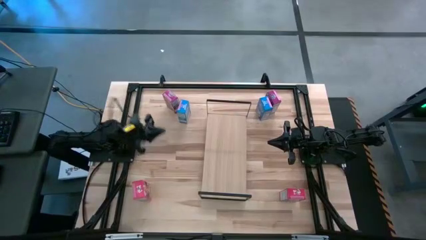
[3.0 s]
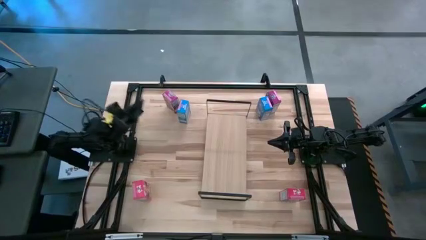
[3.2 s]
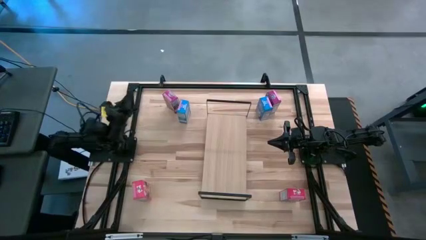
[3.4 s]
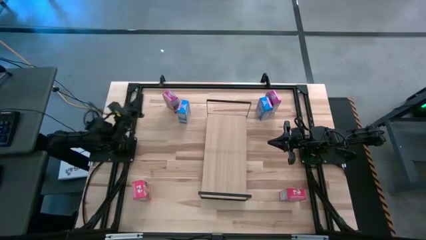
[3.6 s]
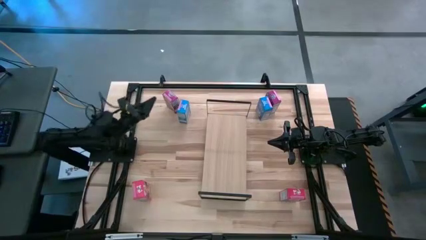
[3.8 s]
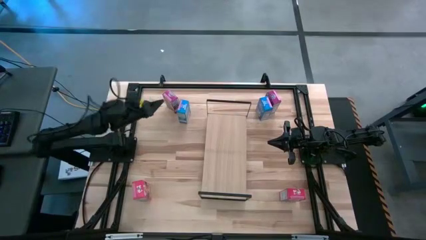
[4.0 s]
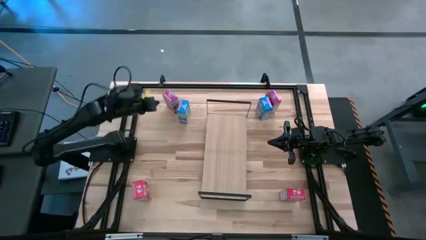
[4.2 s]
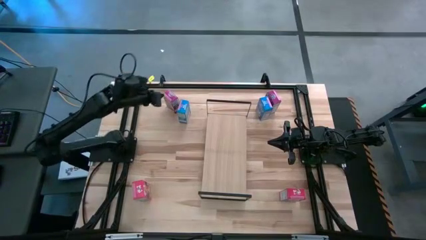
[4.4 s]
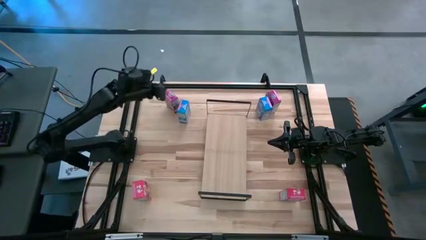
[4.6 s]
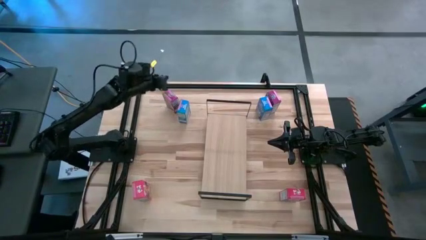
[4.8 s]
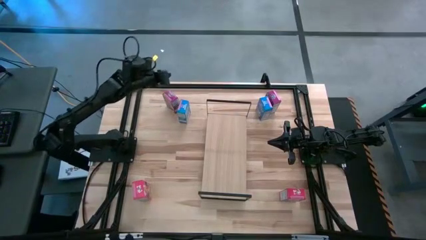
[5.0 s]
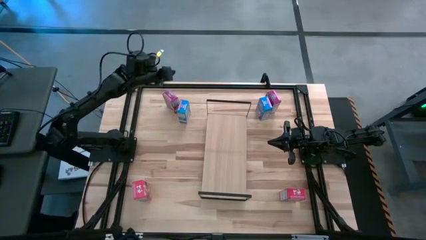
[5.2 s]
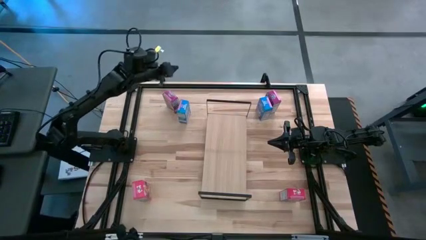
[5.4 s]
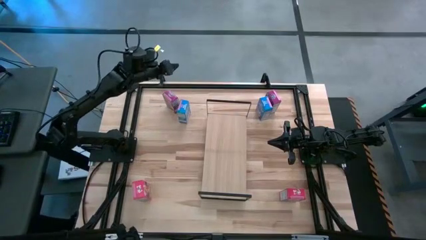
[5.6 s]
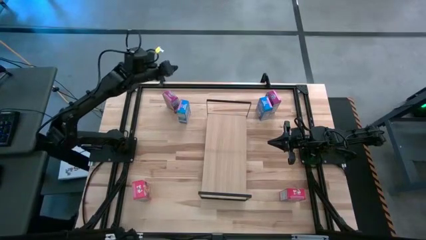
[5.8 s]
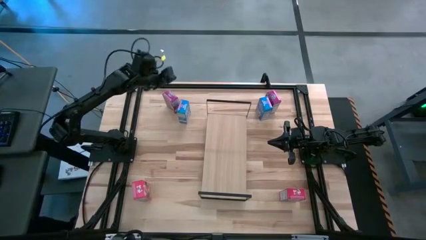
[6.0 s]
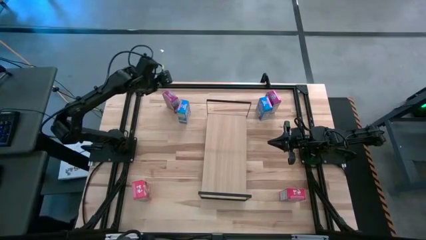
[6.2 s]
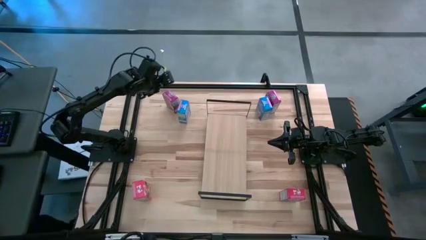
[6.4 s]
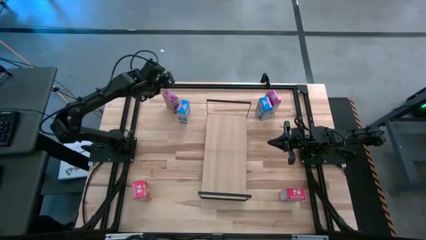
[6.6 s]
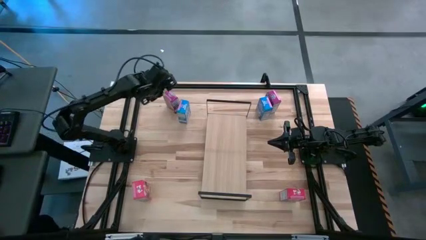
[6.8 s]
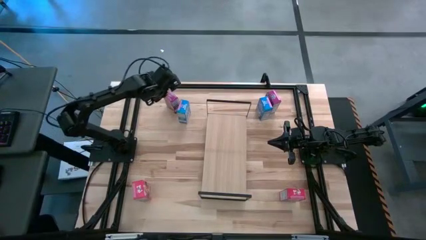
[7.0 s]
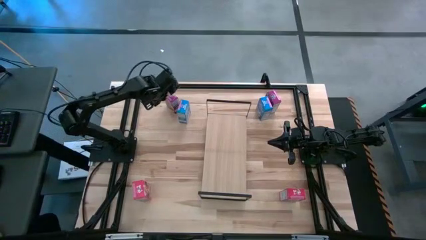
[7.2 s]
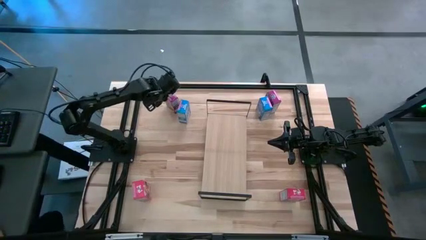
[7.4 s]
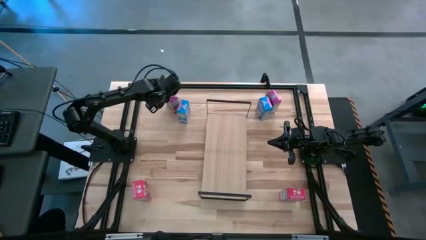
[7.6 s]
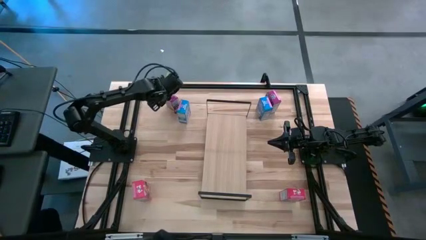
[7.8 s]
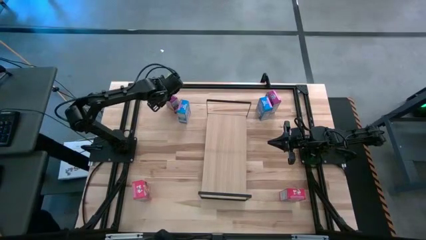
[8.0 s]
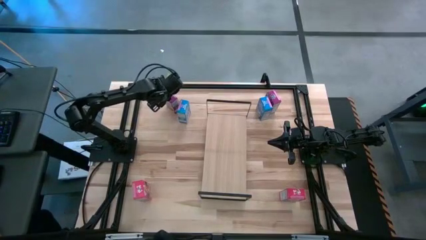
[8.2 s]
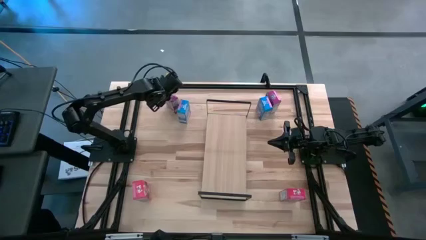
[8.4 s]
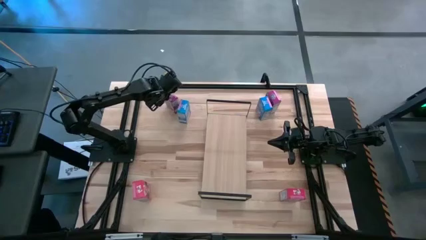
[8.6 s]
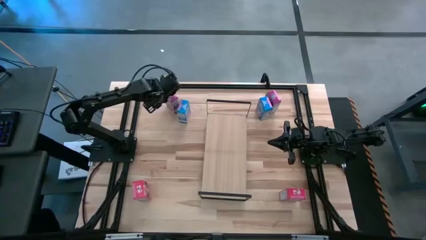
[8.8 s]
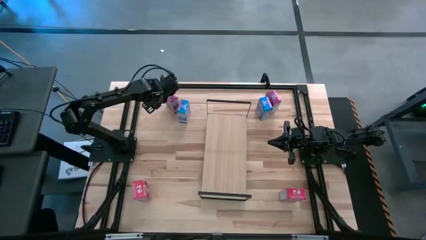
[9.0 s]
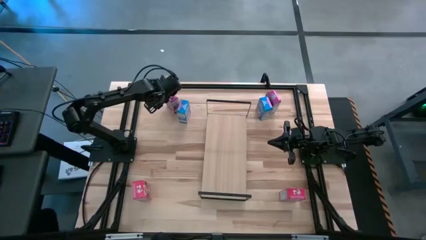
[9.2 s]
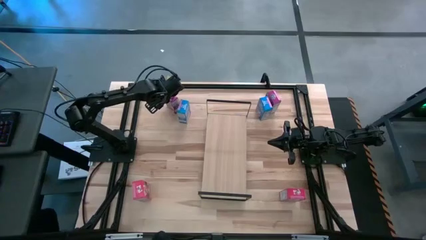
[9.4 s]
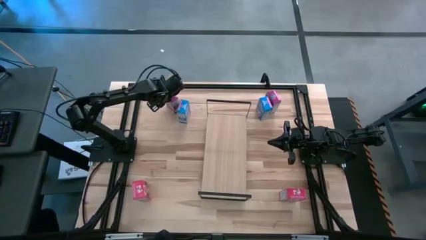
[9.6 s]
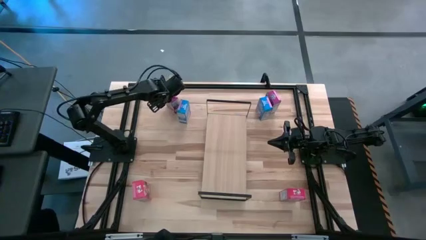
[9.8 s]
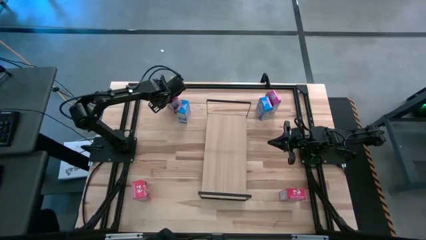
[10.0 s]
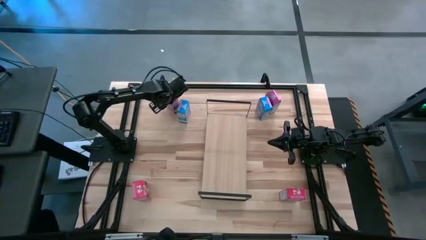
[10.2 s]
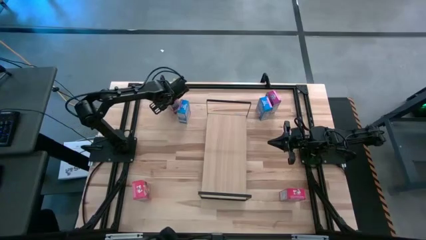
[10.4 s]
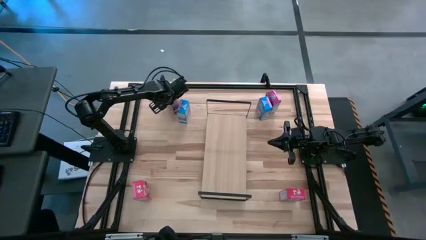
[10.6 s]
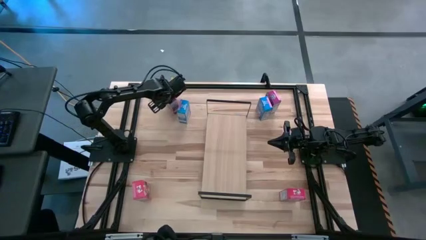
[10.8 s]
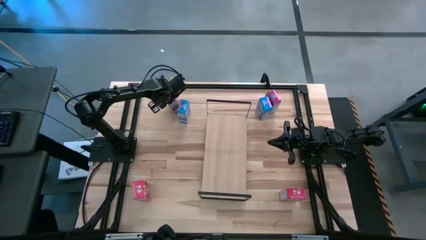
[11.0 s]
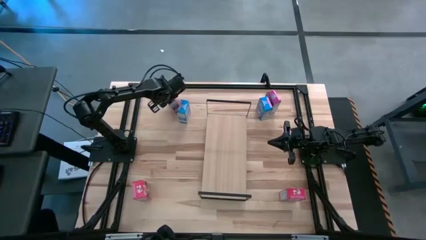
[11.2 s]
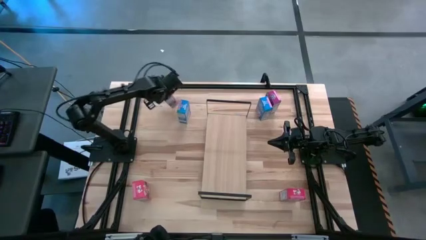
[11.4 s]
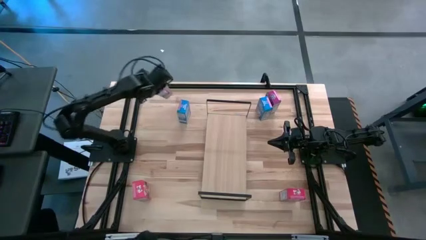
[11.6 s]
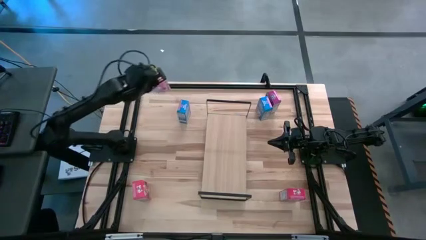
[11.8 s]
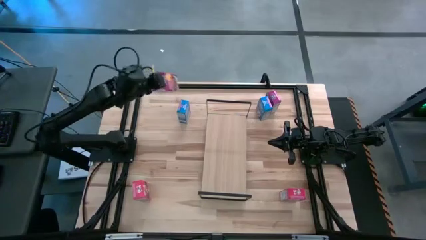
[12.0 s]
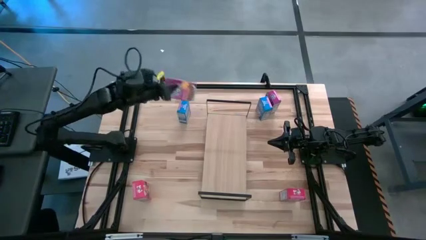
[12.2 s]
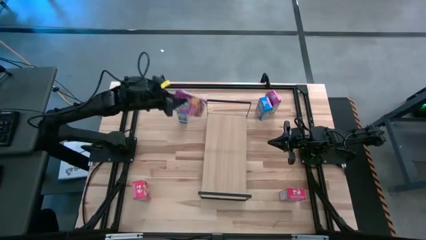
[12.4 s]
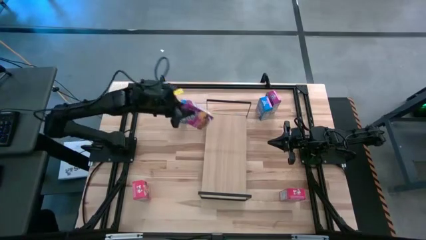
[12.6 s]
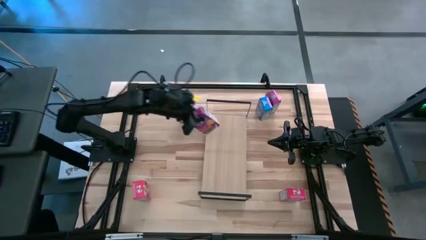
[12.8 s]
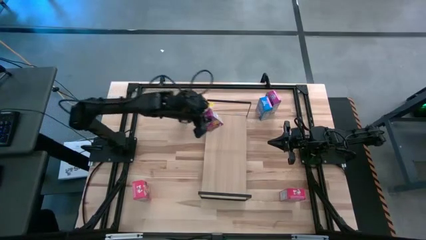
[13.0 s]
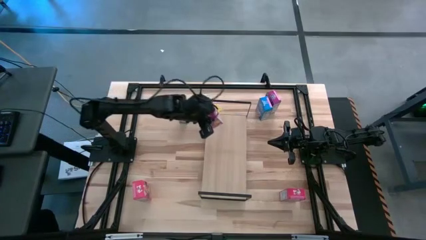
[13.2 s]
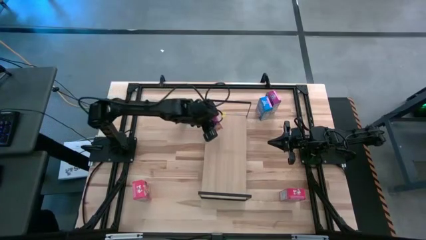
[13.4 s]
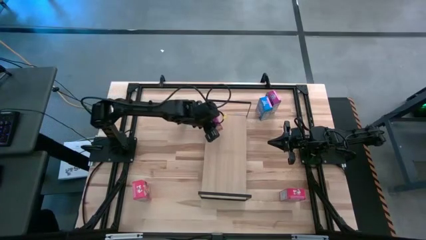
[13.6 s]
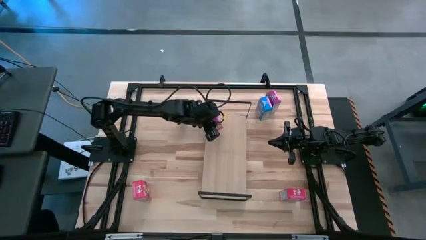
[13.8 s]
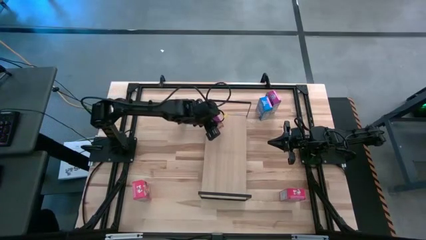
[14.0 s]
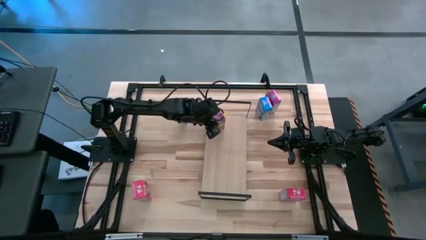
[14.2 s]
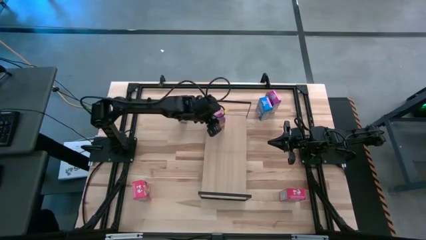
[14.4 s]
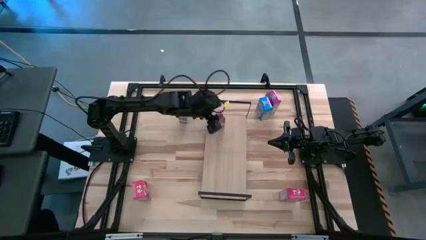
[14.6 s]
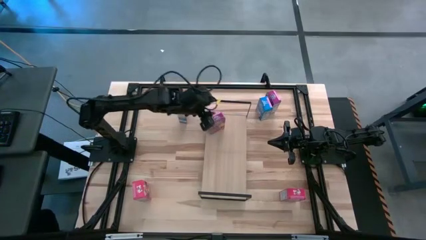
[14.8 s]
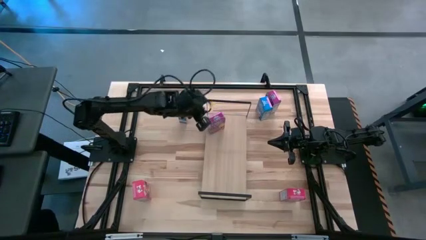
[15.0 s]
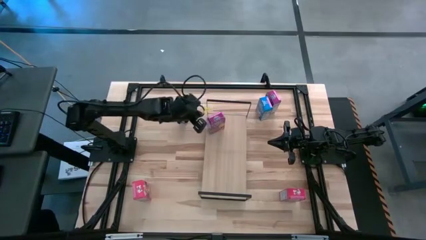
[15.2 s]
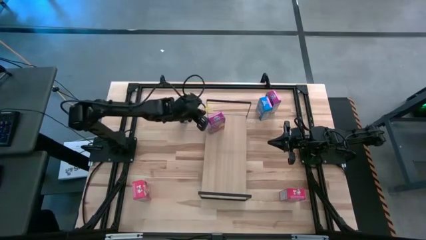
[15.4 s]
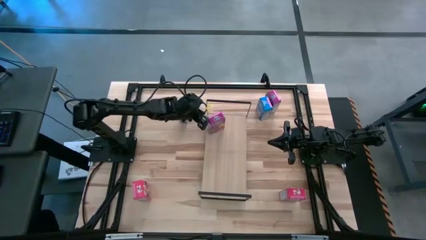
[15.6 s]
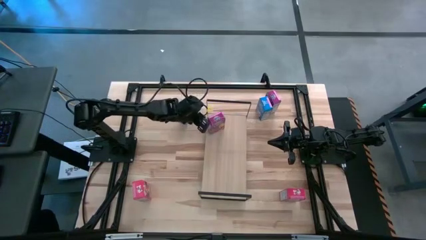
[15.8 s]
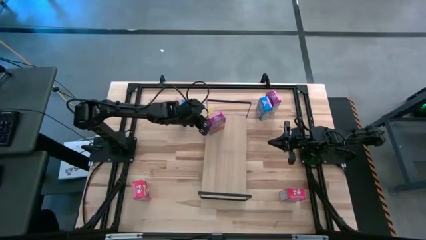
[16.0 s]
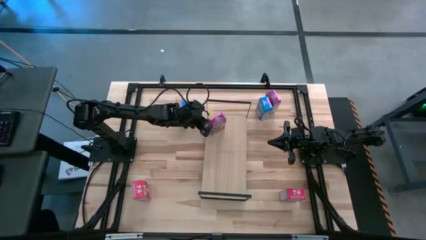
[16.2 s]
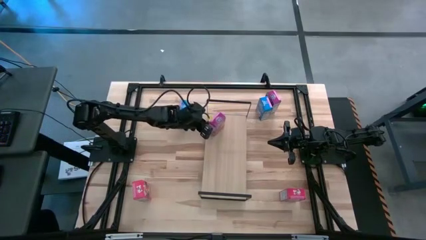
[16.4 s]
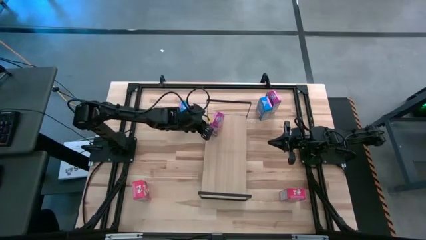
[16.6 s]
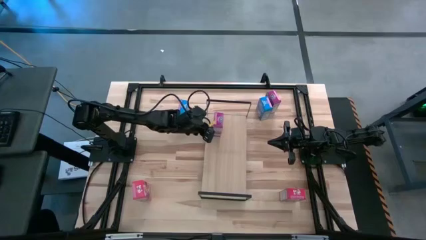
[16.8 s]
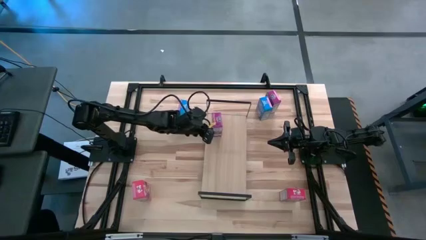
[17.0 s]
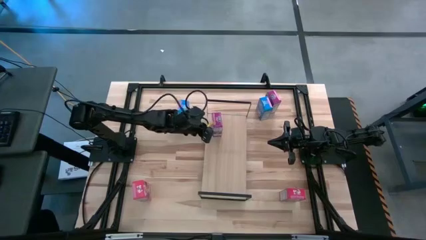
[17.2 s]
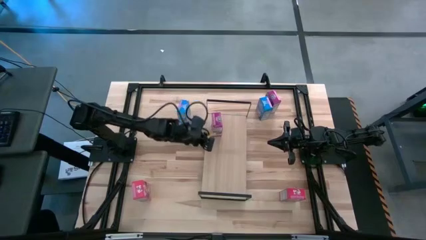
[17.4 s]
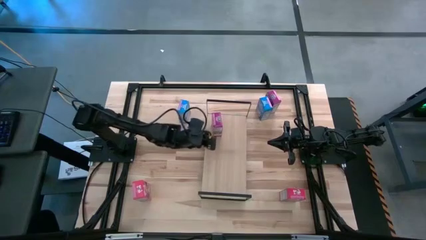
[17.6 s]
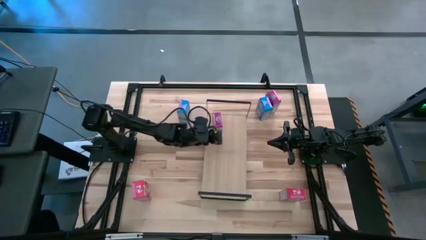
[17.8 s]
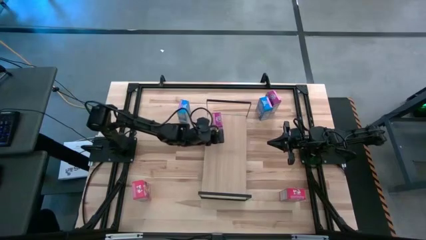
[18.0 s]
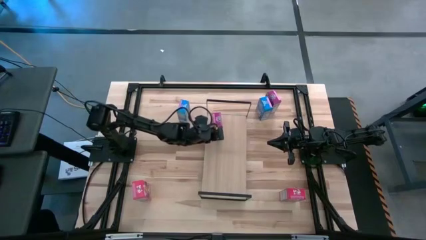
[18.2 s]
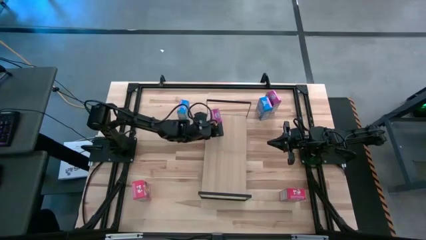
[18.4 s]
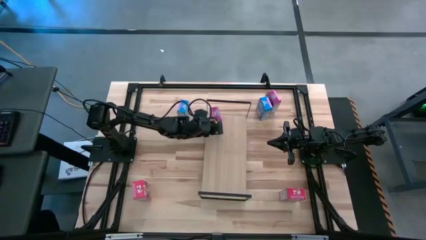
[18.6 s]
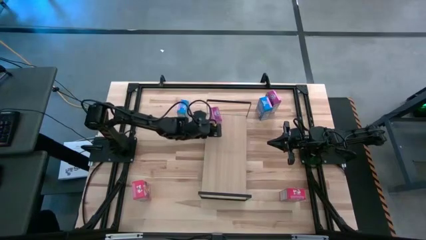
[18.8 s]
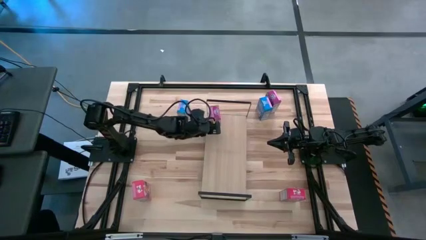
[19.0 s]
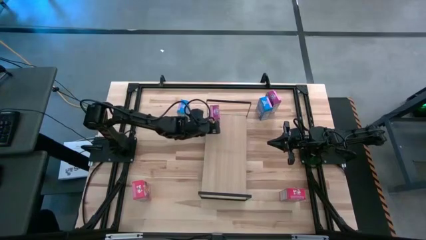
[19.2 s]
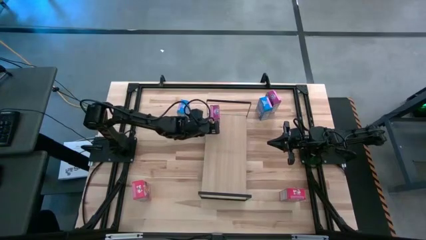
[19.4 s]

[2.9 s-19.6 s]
Task: Stack cereal on shelf
Put the left violet cereal box on the shelf
